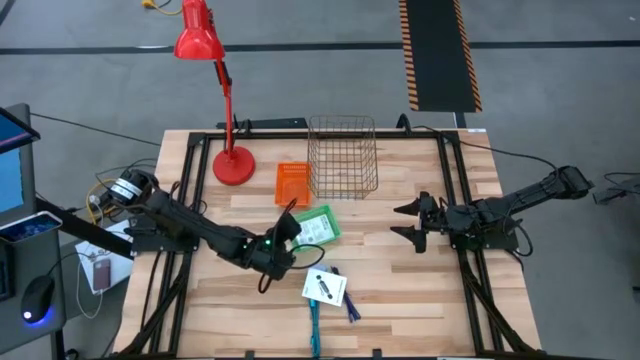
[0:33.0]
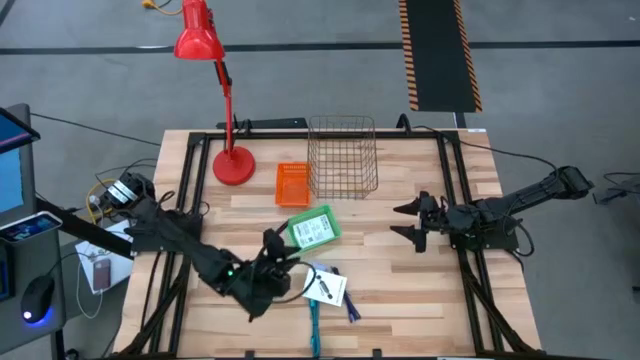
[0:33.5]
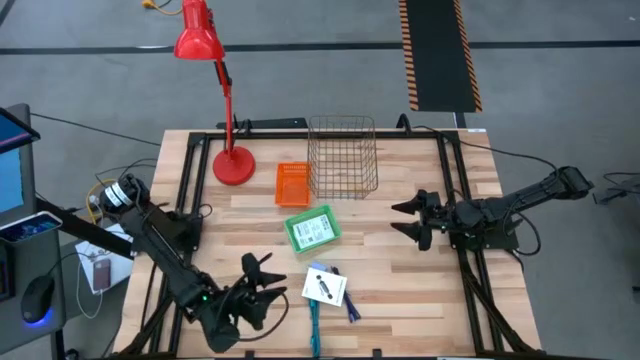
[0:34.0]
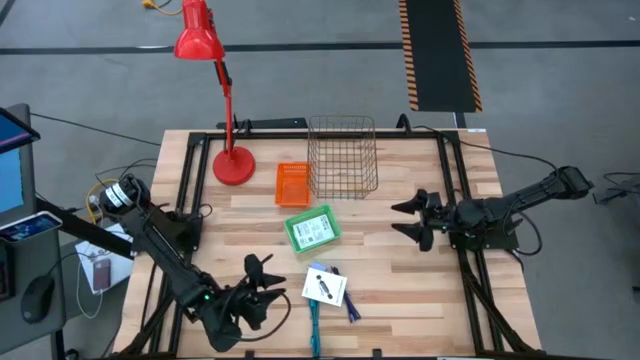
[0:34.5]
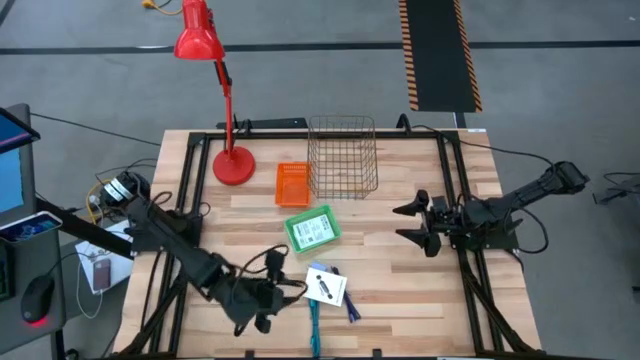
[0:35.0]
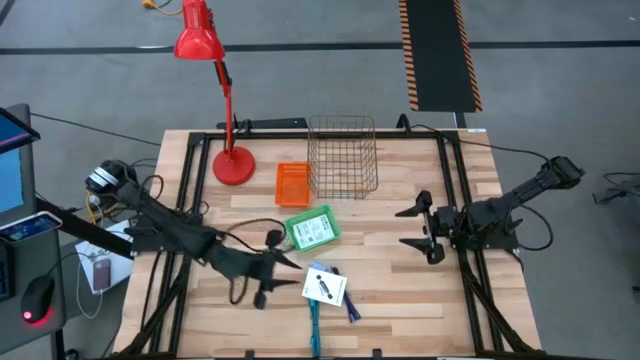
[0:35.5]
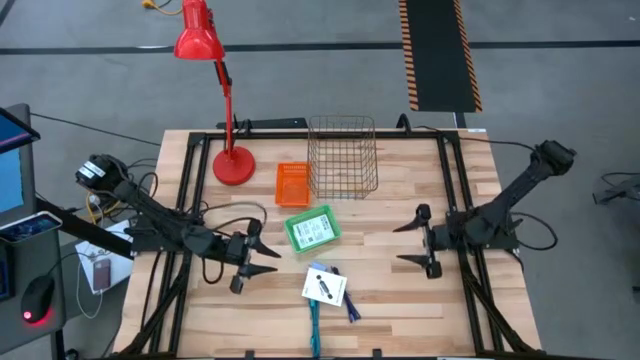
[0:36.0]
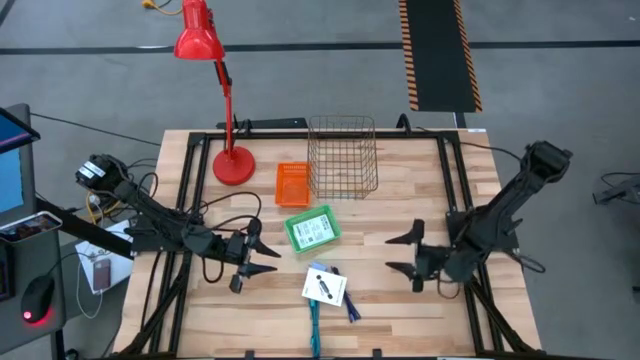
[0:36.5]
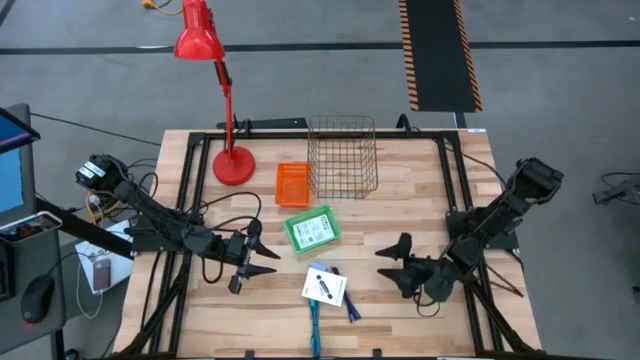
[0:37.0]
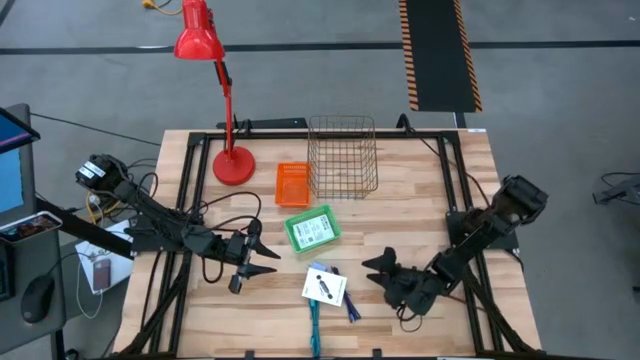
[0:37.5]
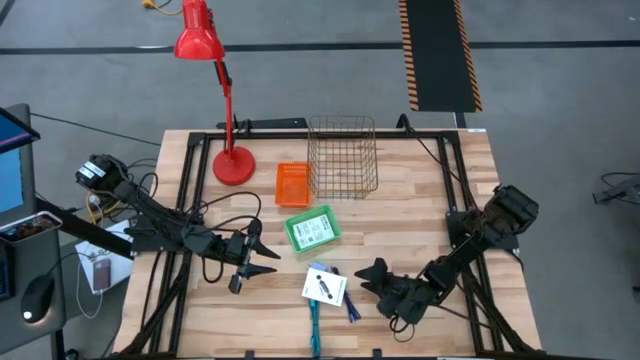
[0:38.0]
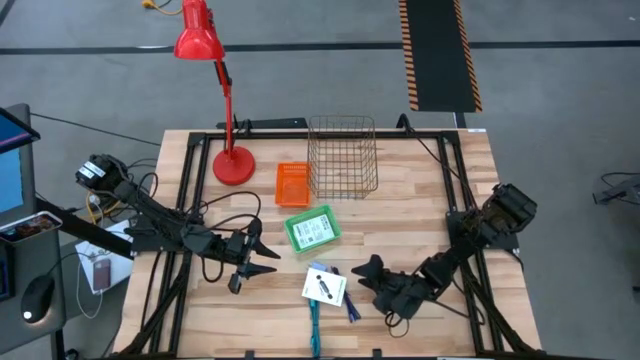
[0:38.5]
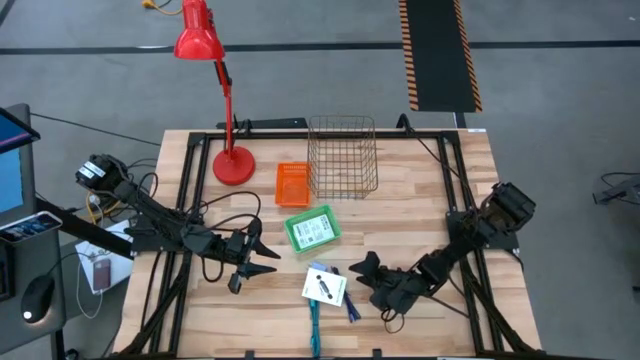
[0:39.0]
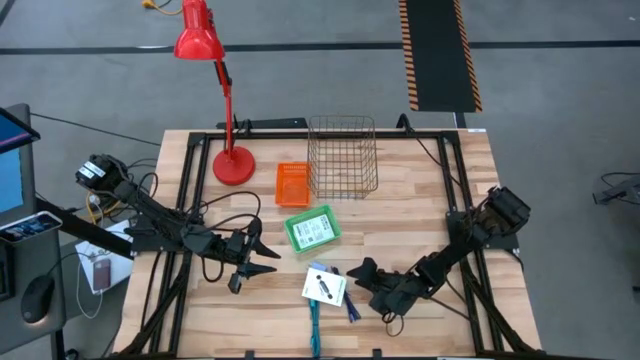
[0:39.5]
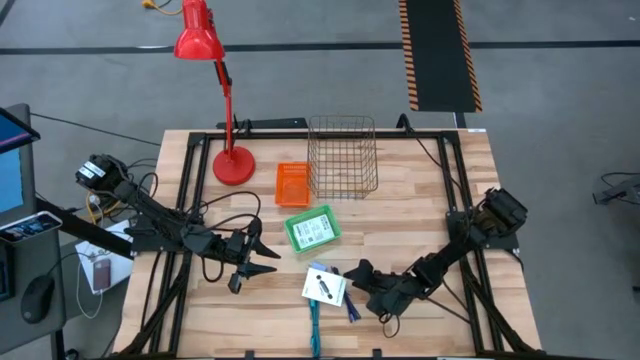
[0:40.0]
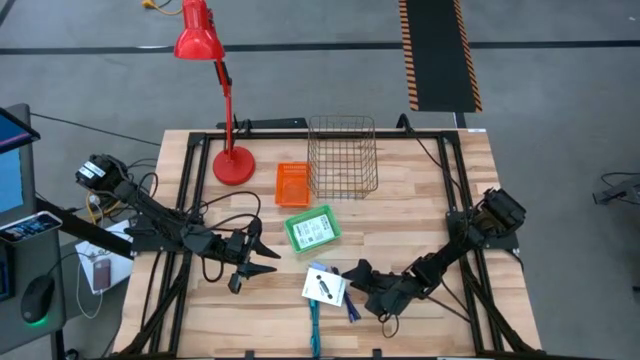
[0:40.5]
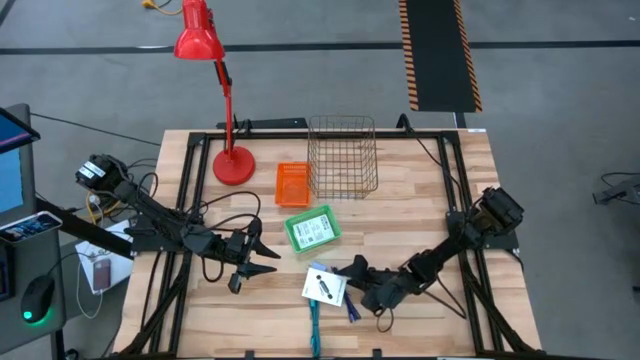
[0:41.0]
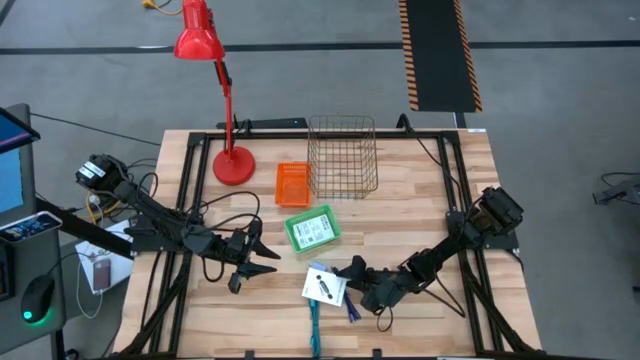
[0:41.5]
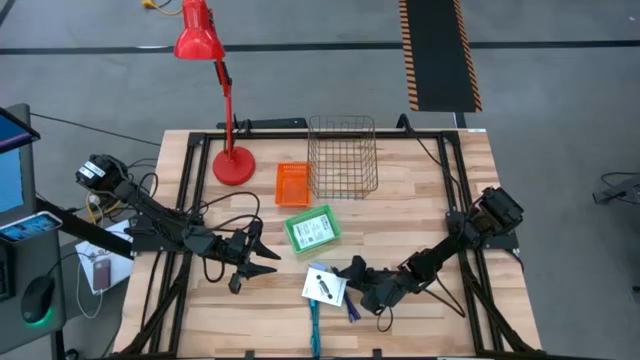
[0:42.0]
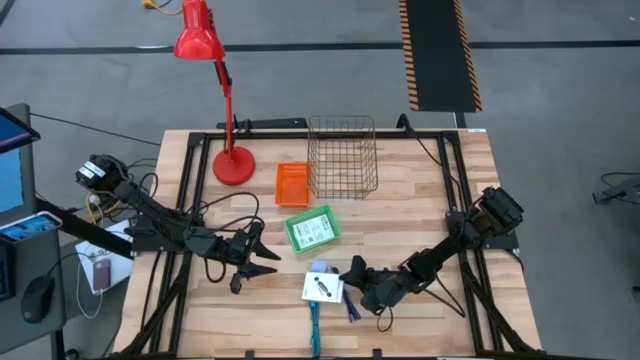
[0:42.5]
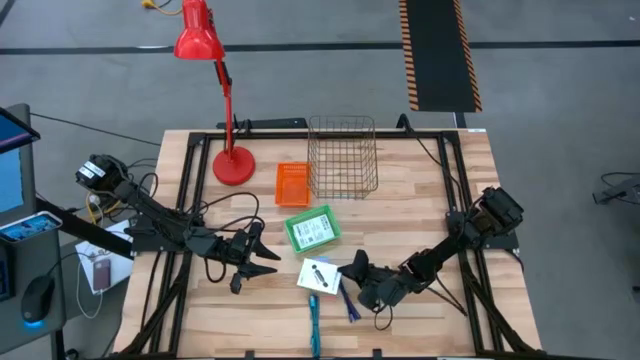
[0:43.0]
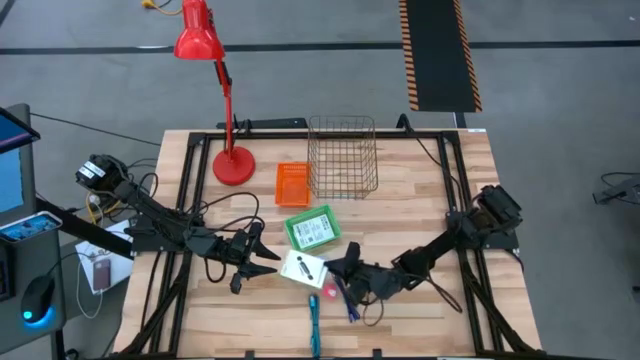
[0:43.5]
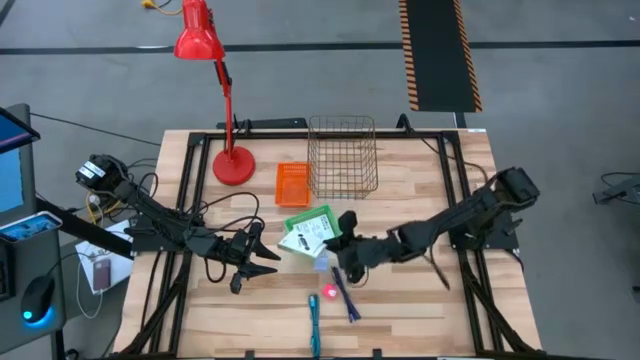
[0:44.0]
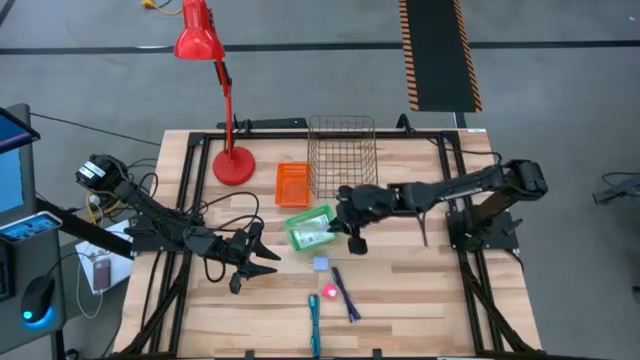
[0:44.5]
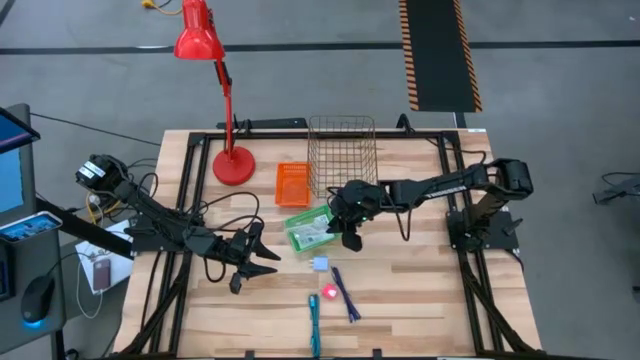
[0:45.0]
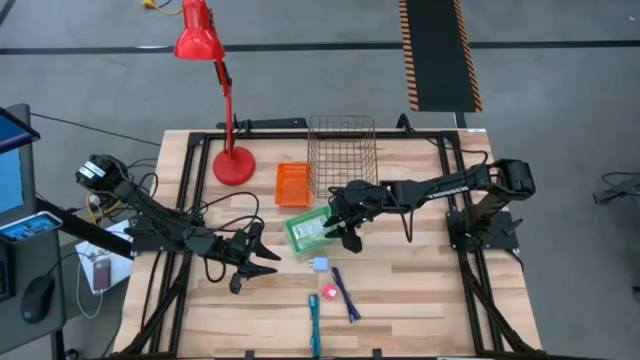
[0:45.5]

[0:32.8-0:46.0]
Task: Pick and place items into bin
Put the card reader box into the green bin

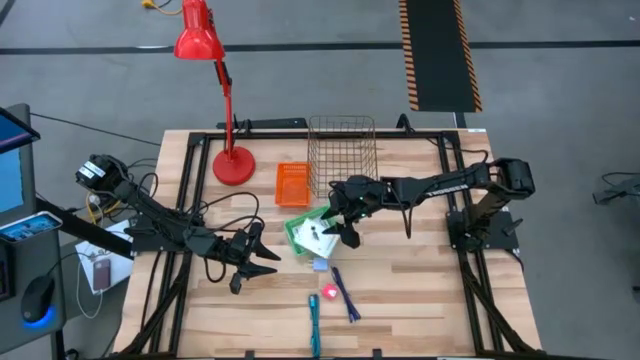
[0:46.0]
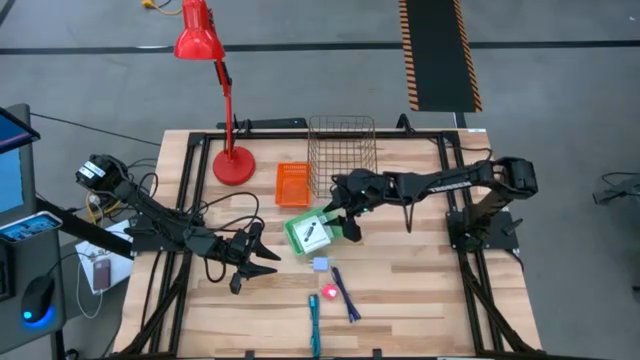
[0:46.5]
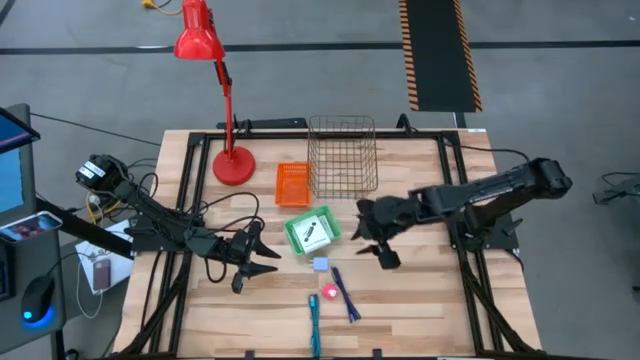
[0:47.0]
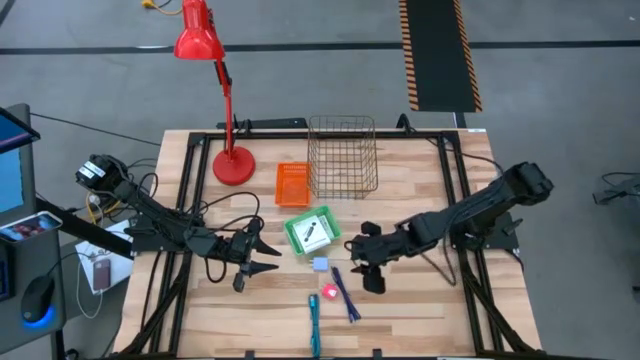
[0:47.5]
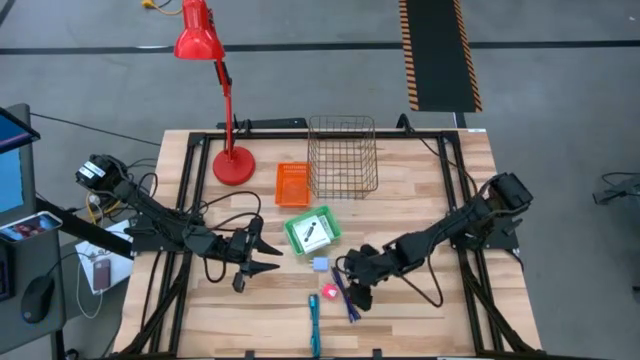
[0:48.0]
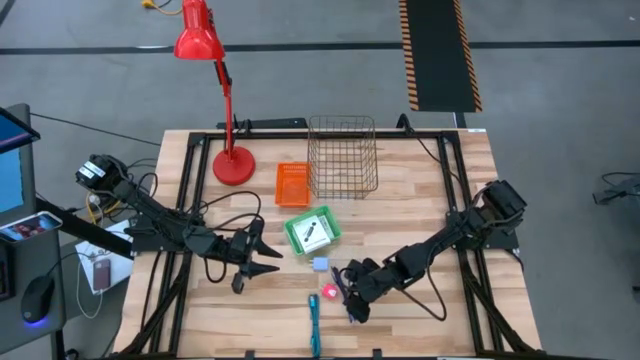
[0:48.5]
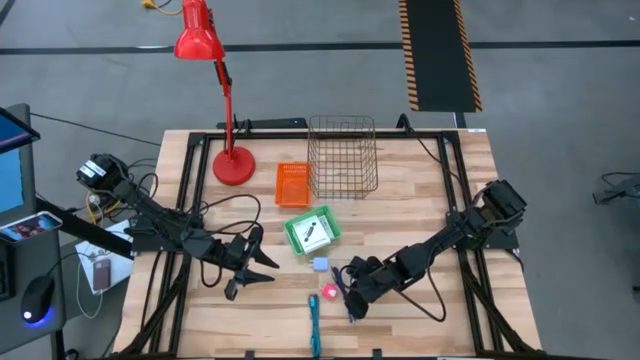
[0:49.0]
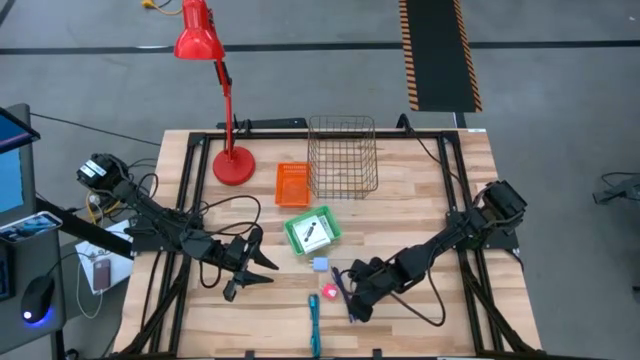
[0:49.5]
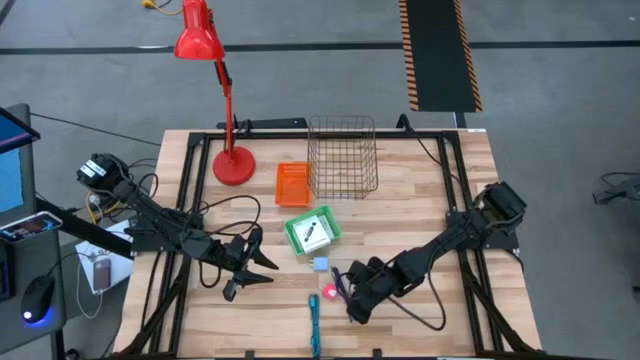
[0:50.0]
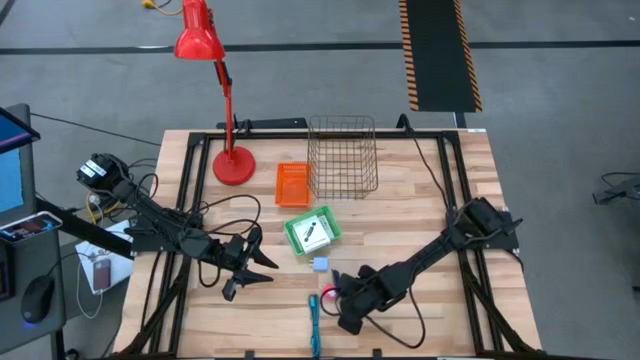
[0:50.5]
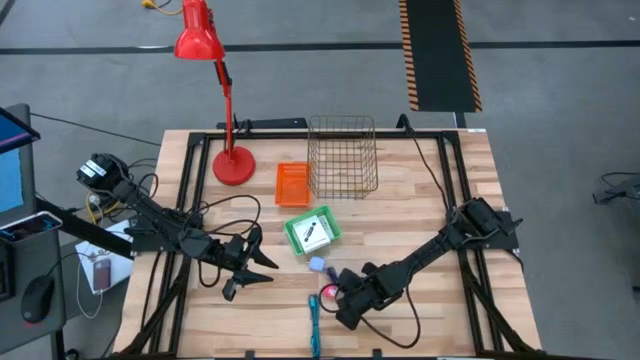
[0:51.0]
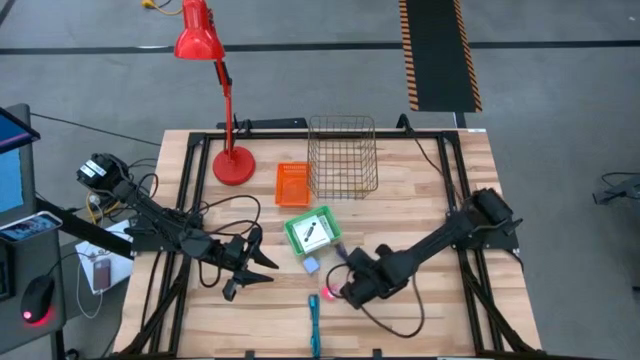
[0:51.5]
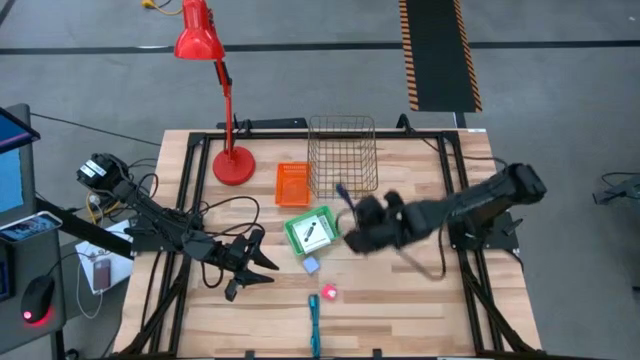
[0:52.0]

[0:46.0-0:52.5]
Put the blue charger cord into the wire basket

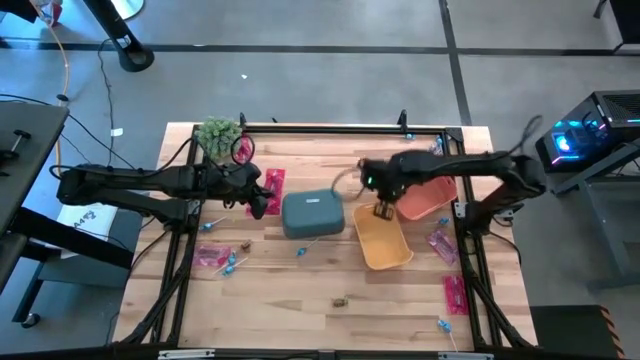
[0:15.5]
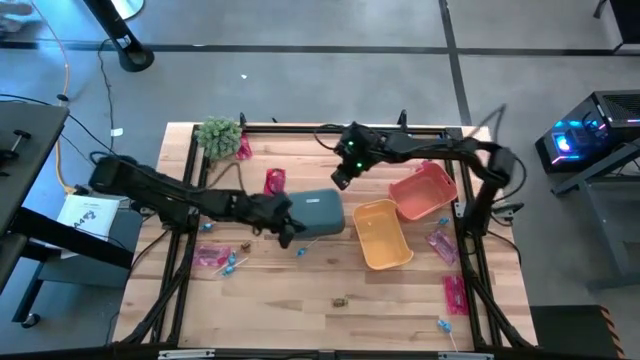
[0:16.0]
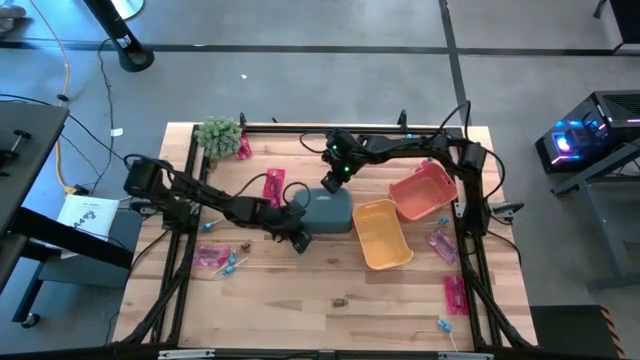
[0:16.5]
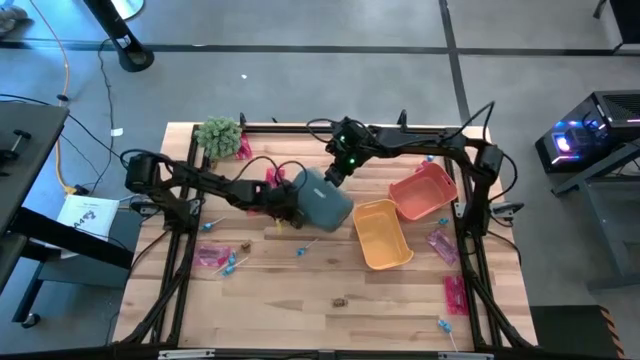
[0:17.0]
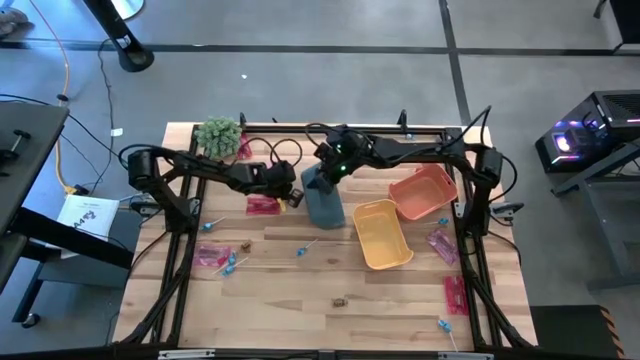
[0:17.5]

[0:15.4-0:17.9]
Task: Sort candy
Prepare the blue bin
